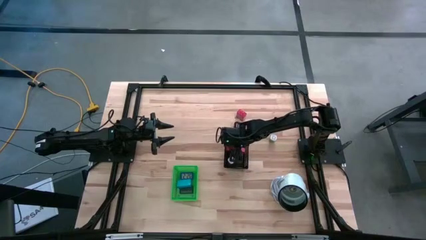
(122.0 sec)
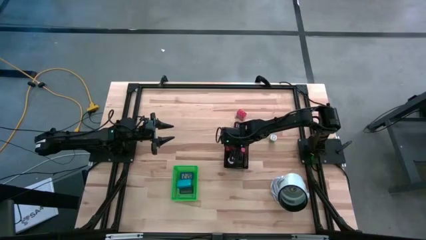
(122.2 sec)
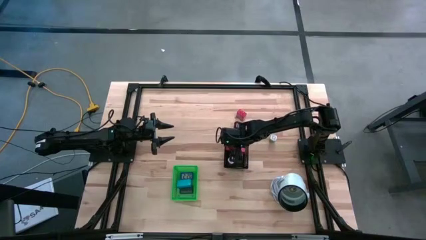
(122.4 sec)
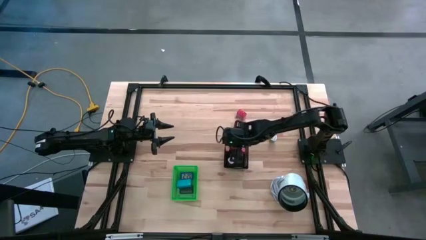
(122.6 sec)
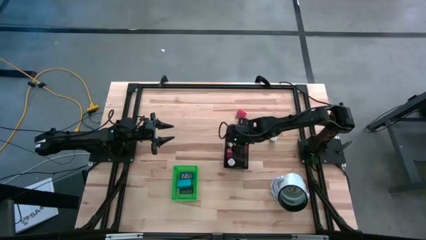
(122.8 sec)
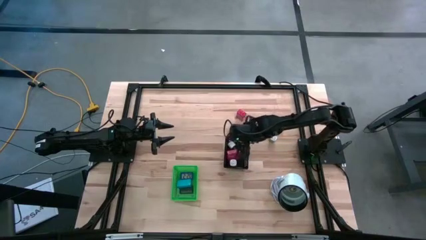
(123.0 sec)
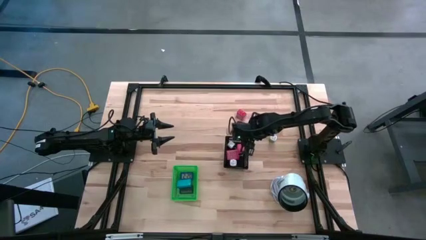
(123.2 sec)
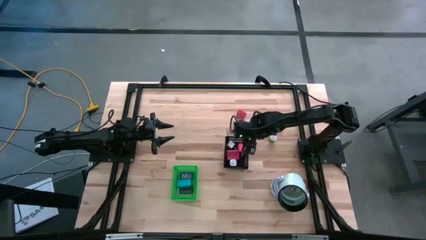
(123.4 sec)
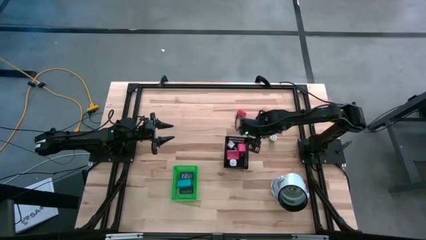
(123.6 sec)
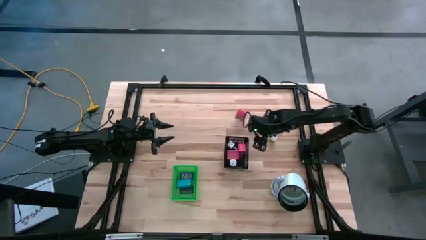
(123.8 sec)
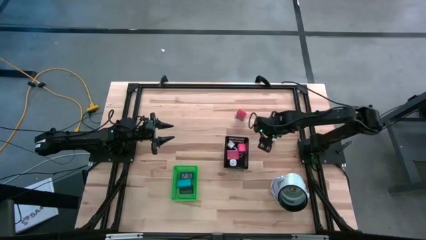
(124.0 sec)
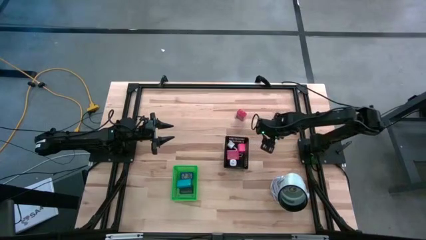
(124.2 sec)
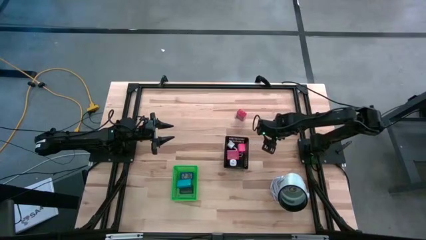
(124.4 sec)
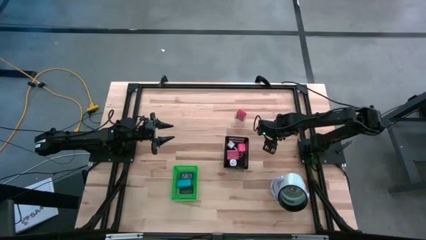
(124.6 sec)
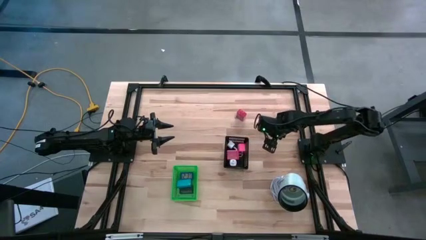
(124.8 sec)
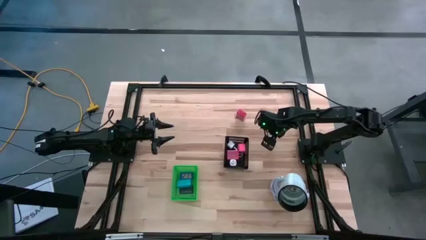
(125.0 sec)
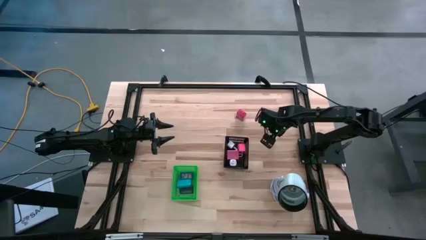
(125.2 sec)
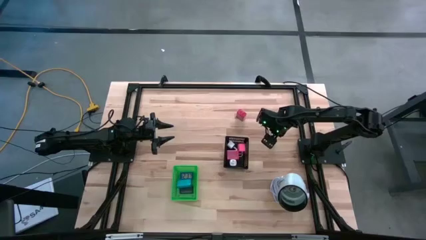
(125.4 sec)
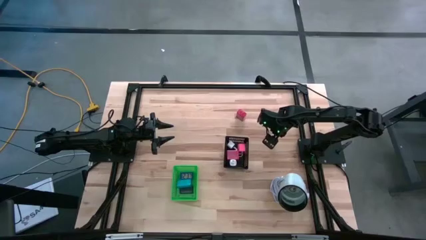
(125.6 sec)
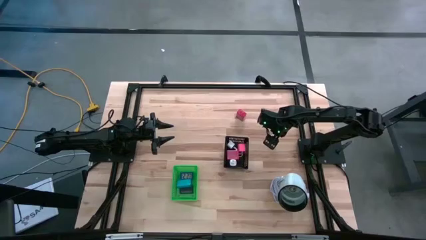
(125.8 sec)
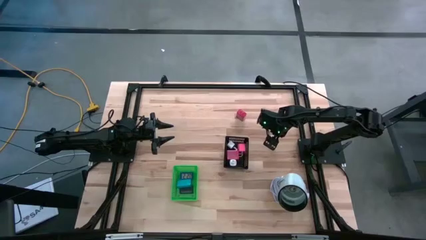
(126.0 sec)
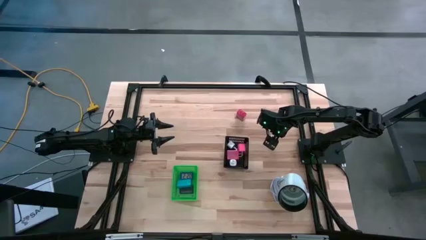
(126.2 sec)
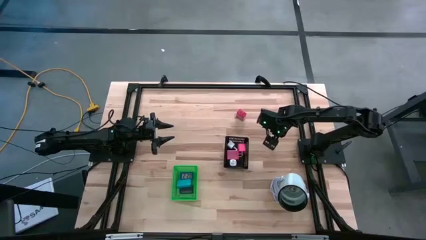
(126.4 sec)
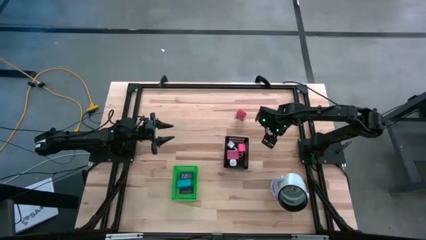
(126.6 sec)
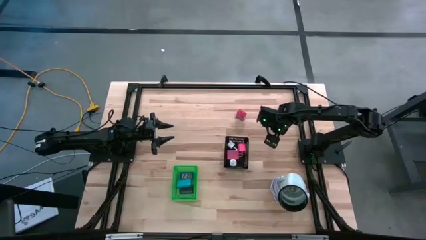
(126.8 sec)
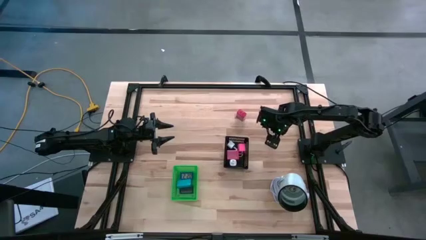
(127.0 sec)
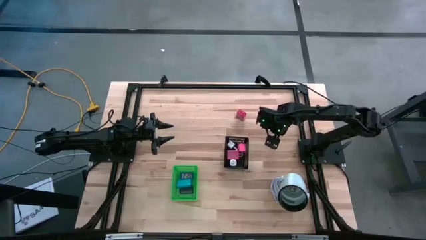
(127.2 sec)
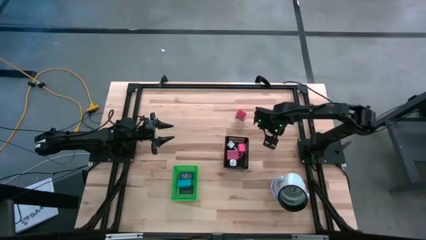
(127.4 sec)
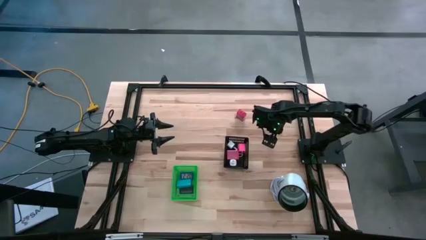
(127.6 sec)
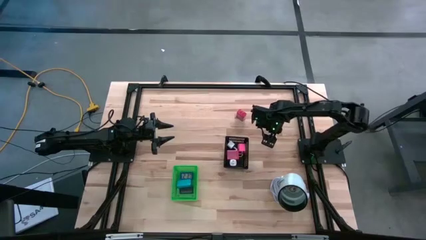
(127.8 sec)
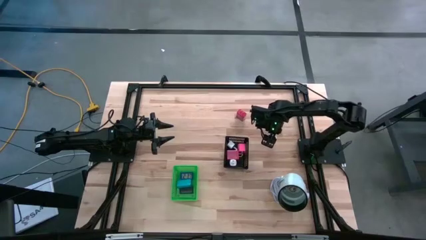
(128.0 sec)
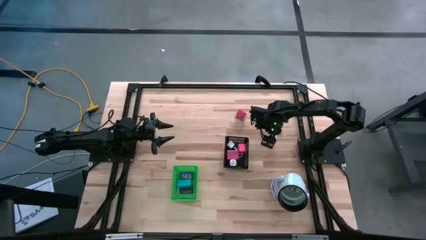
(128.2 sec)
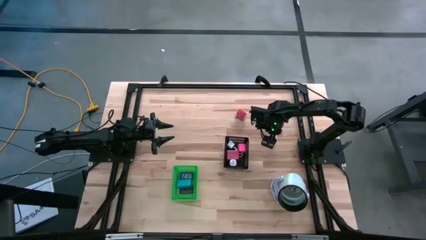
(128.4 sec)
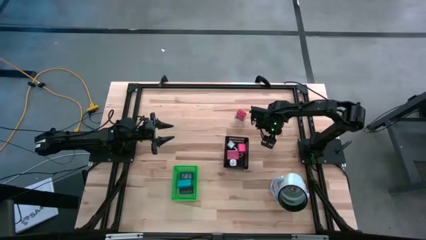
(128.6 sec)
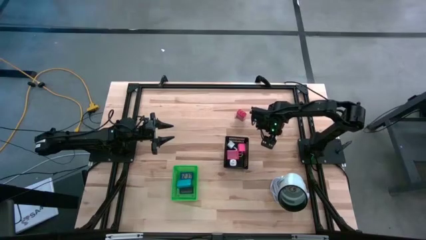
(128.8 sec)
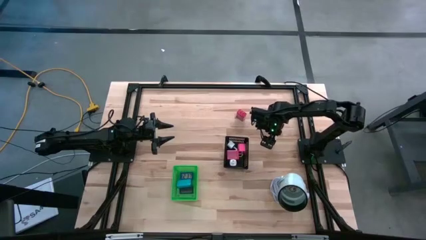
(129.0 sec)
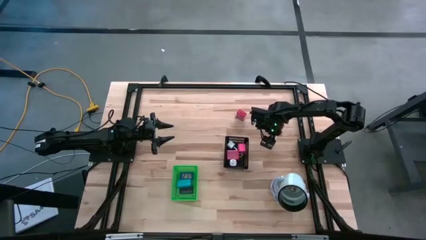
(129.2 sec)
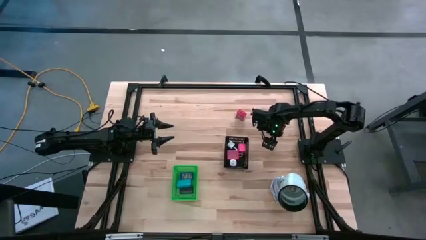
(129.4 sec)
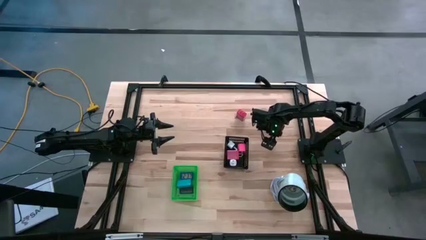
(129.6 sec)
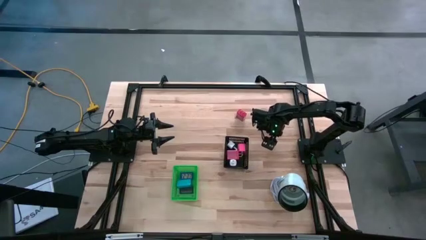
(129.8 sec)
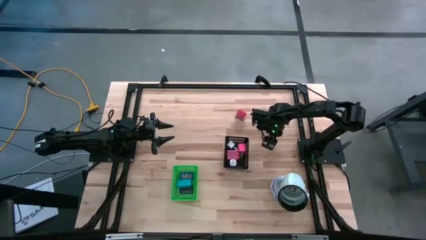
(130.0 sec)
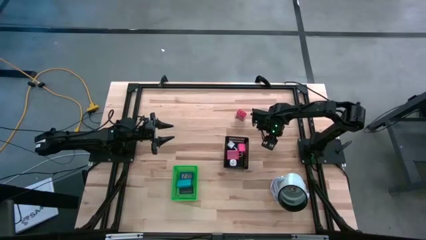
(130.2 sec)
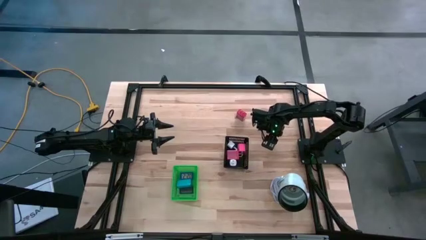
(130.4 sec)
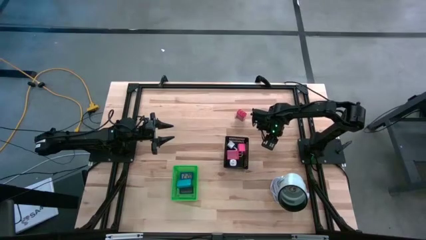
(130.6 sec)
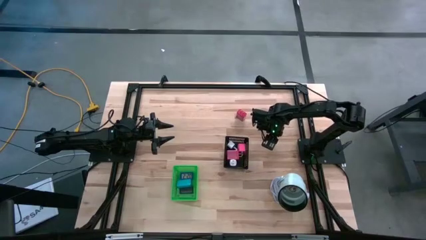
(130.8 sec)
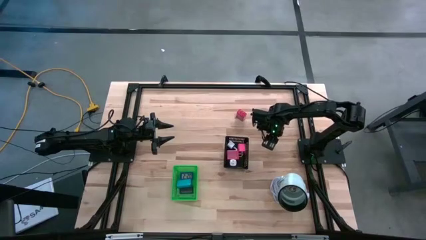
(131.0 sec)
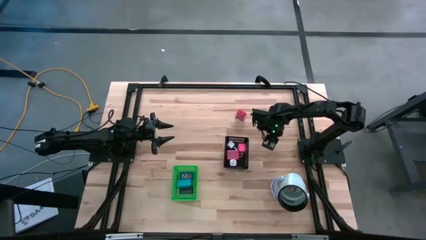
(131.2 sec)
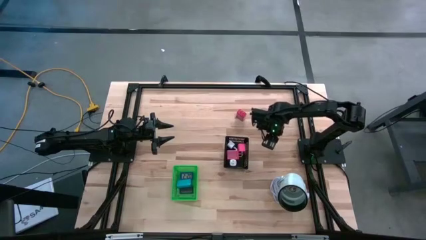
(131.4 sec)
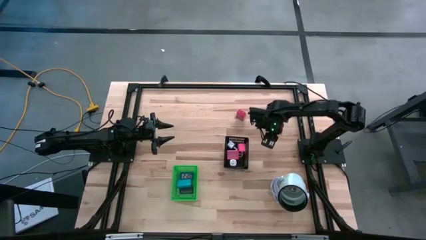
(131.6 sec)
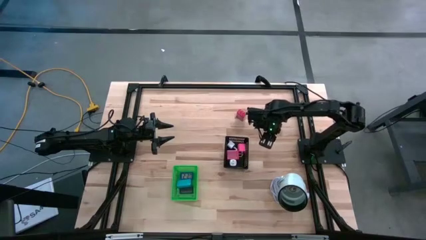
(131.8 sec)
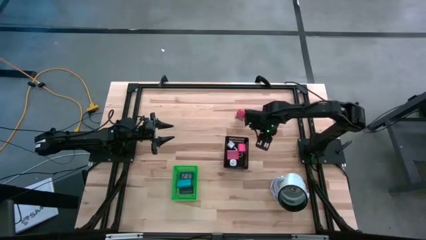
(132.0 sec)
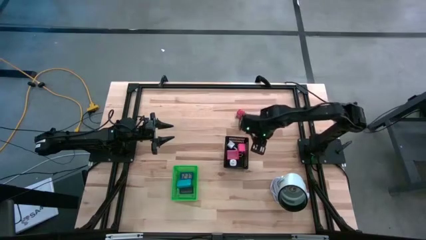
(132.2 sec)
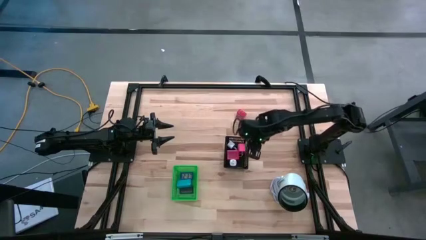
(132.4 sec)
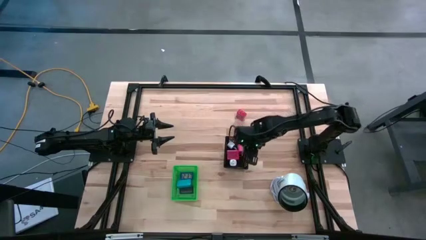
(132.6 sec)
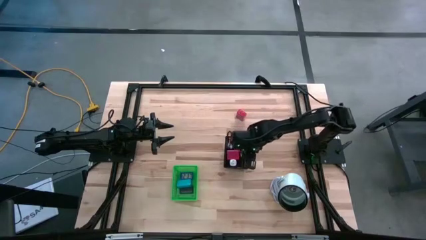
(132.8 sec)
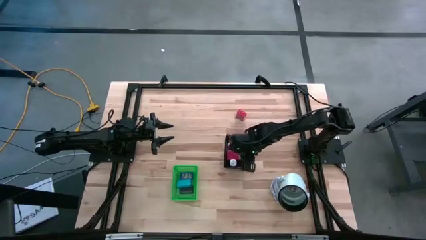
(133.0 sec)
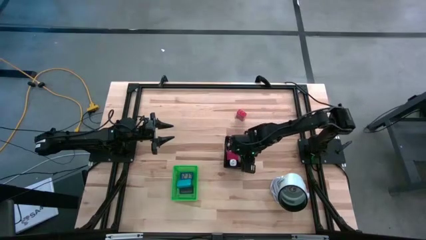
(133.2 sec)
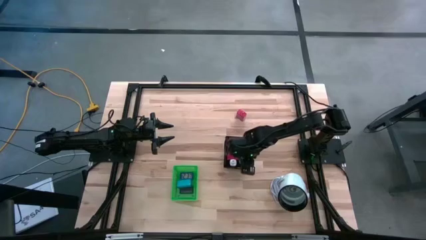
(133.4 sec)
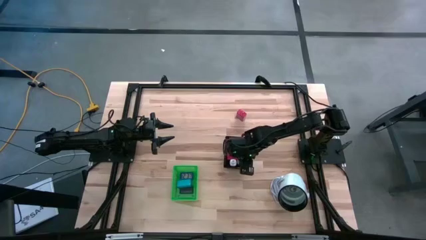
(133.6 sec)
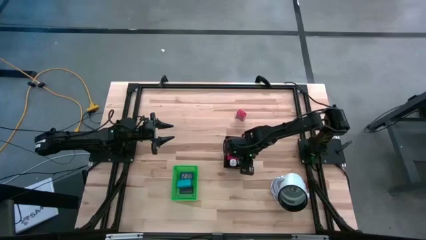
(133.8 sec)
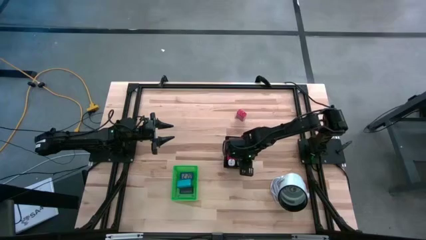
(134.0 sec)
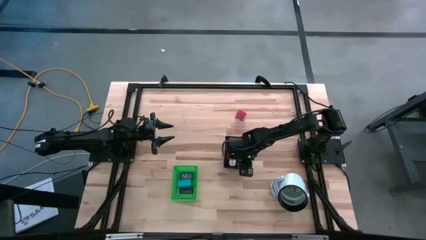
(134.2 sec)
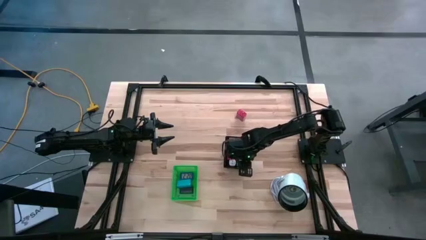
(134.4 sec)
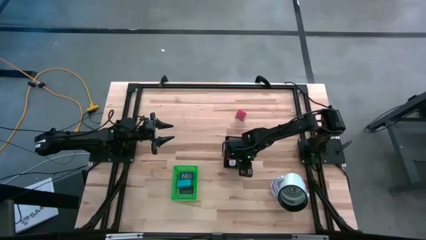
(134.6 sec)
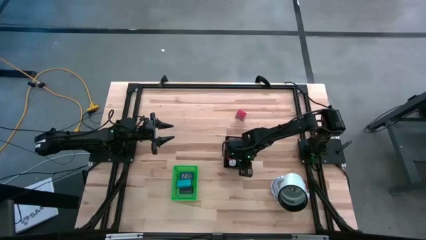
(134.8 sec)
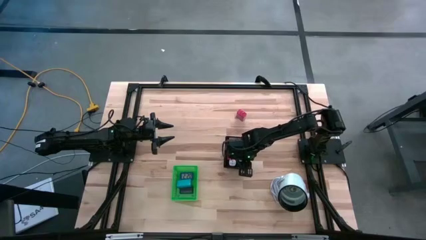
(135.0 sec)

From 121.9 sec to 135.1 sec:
Task: Pick & Place Office items
Put the green charger adapter into the black bin
